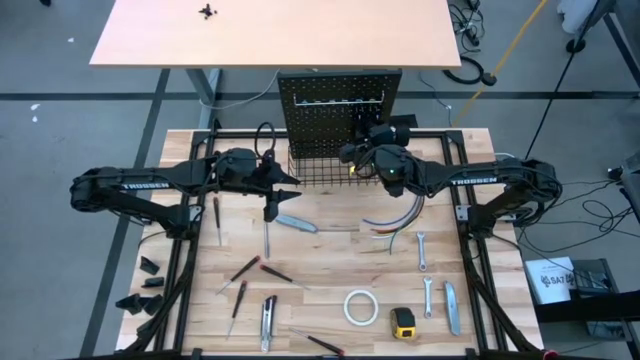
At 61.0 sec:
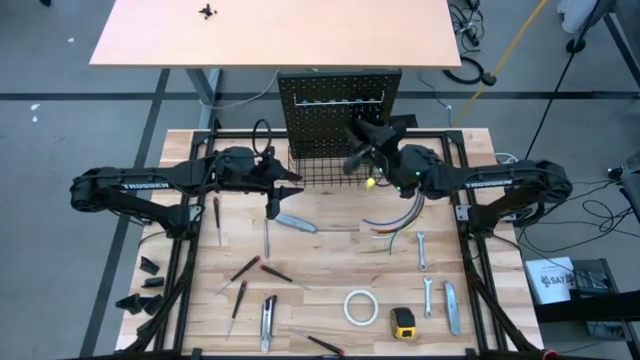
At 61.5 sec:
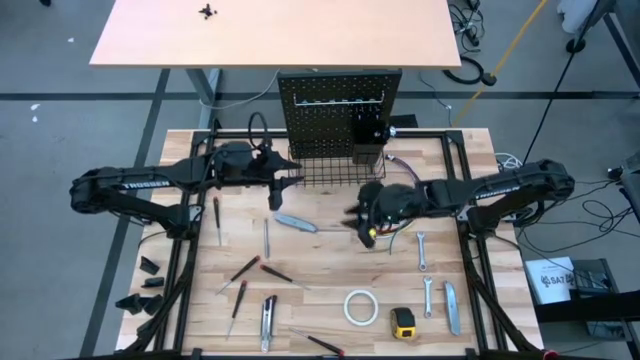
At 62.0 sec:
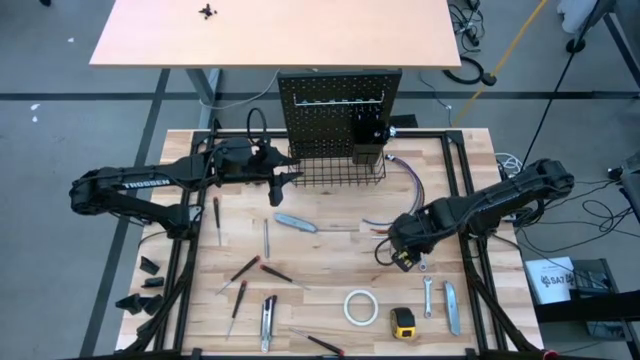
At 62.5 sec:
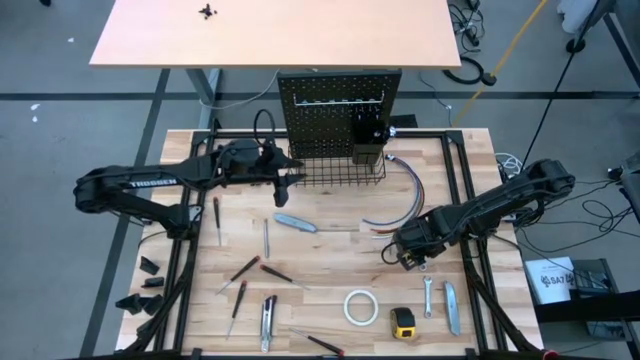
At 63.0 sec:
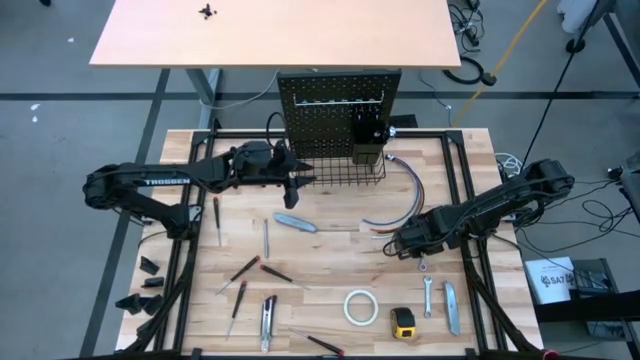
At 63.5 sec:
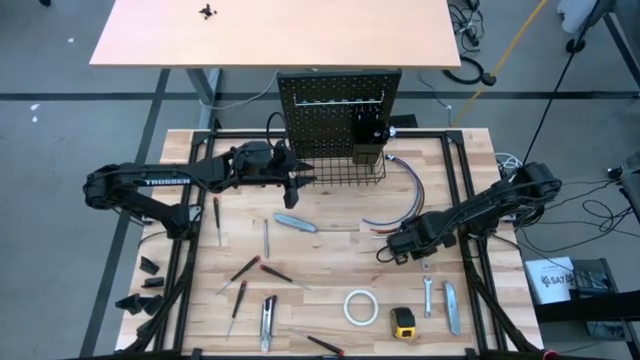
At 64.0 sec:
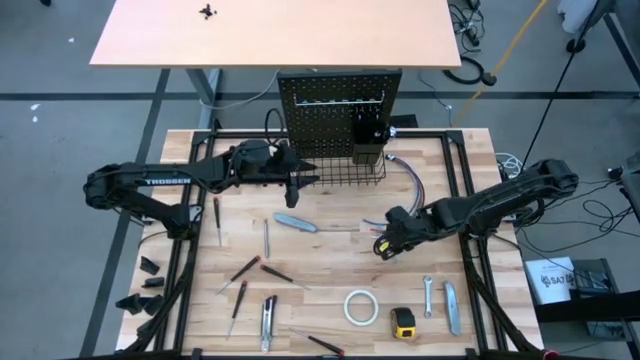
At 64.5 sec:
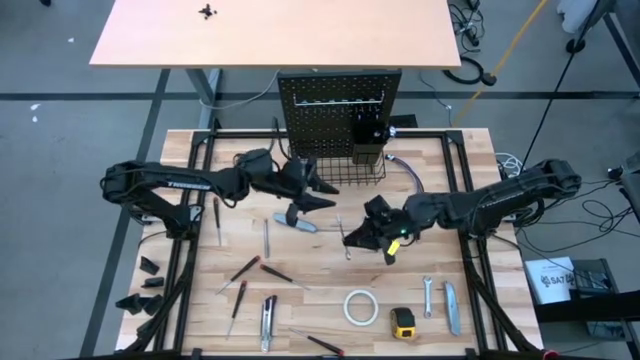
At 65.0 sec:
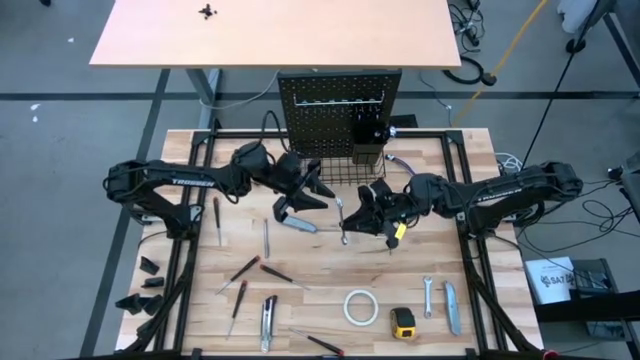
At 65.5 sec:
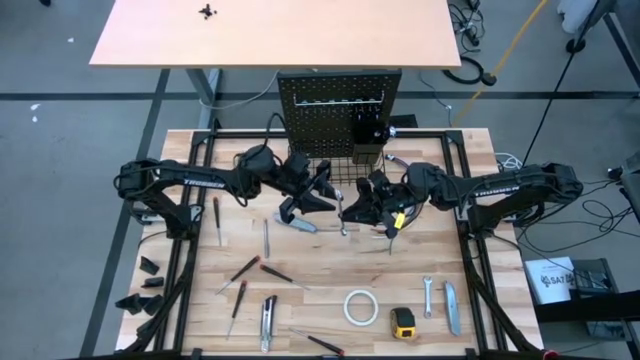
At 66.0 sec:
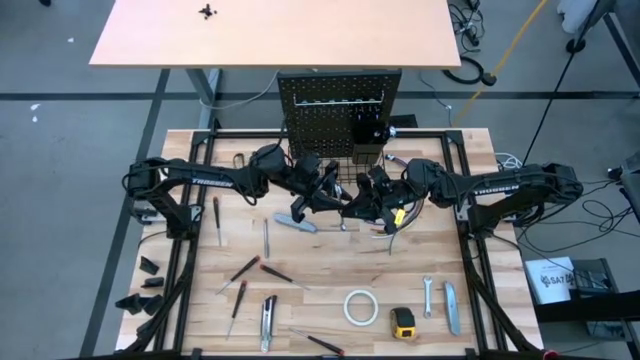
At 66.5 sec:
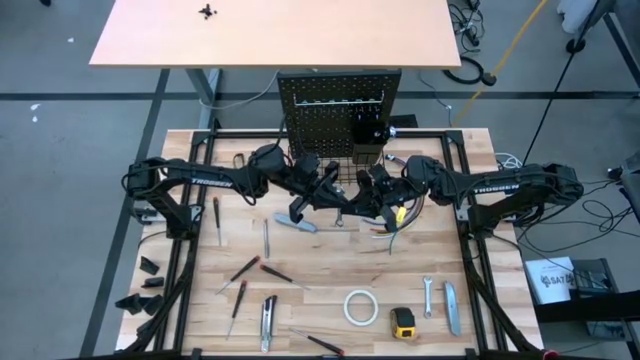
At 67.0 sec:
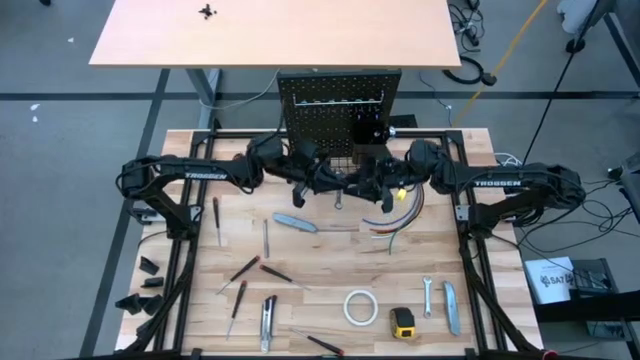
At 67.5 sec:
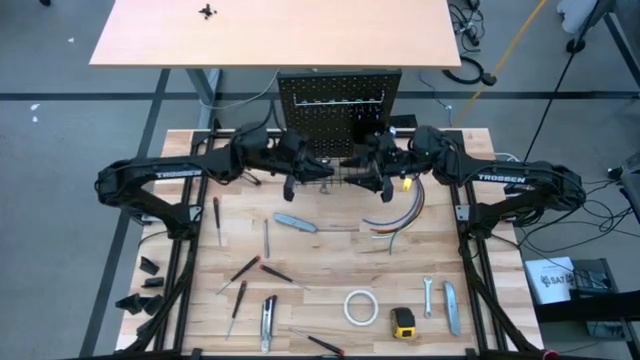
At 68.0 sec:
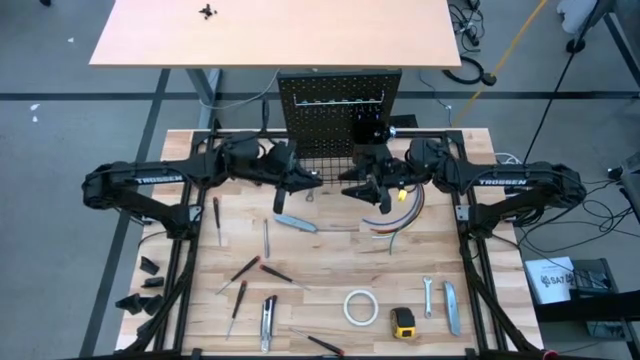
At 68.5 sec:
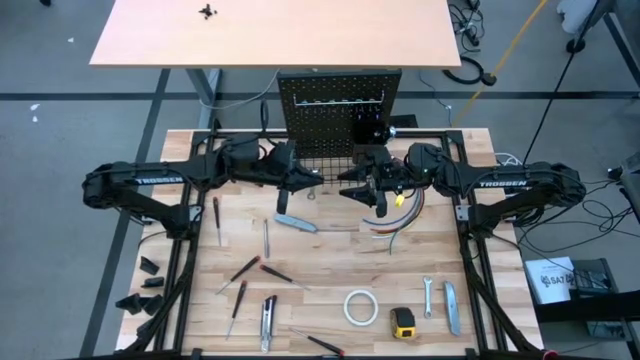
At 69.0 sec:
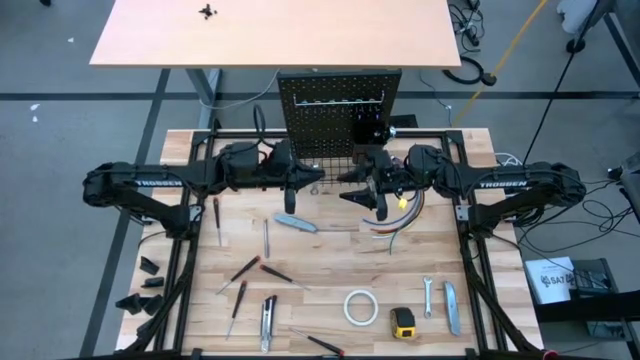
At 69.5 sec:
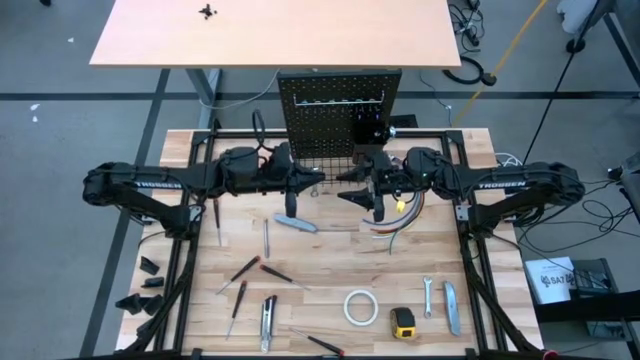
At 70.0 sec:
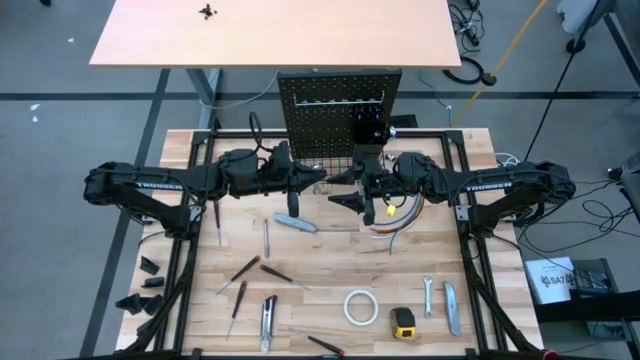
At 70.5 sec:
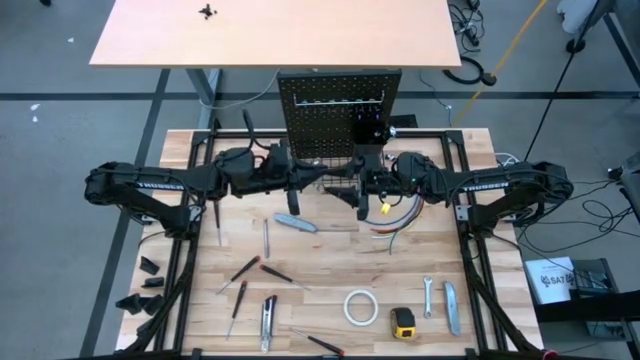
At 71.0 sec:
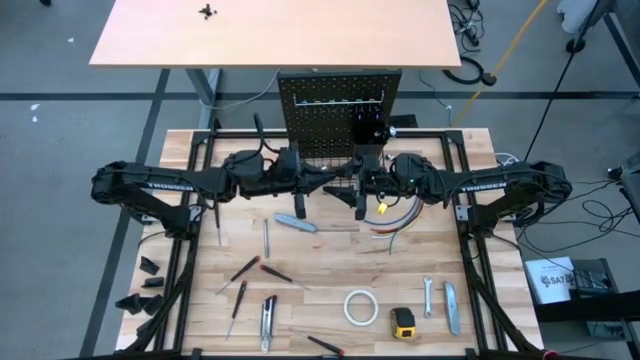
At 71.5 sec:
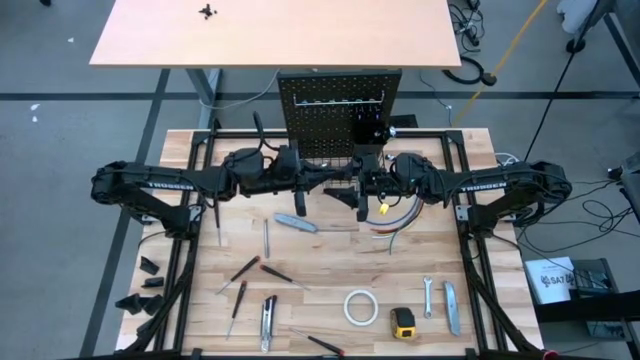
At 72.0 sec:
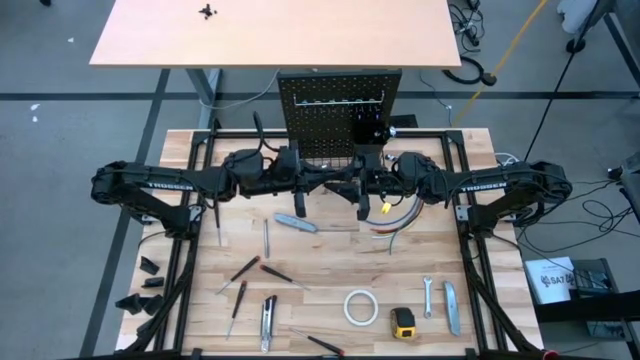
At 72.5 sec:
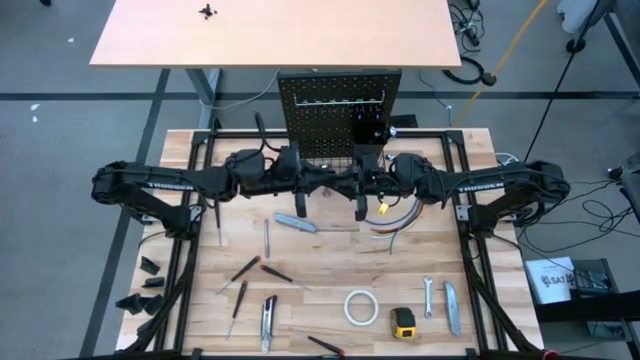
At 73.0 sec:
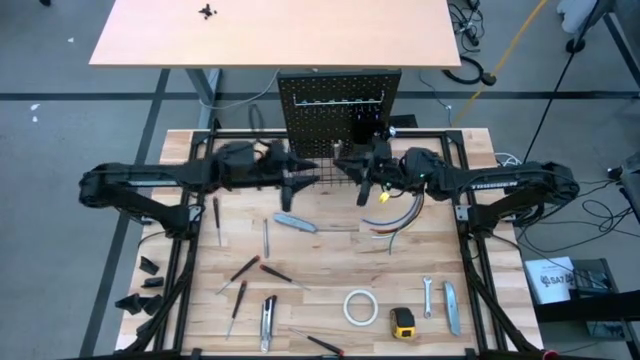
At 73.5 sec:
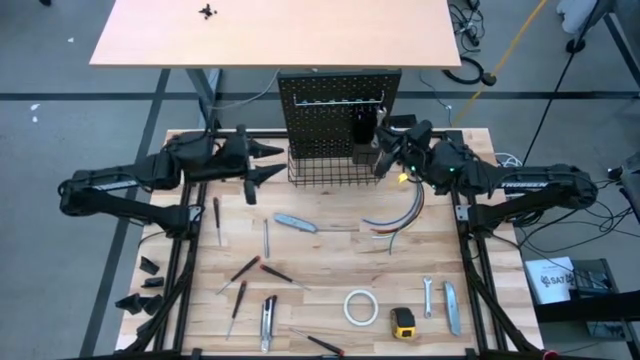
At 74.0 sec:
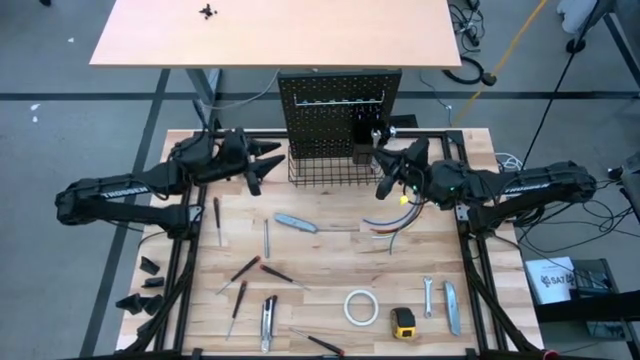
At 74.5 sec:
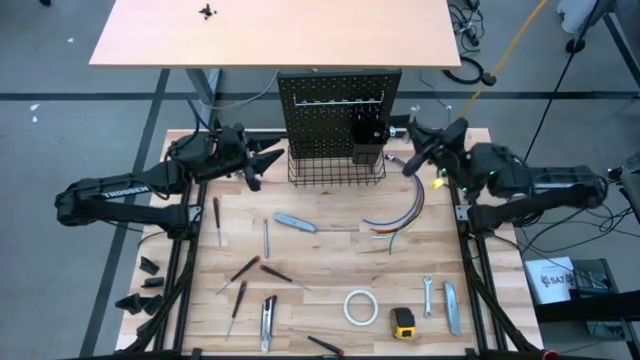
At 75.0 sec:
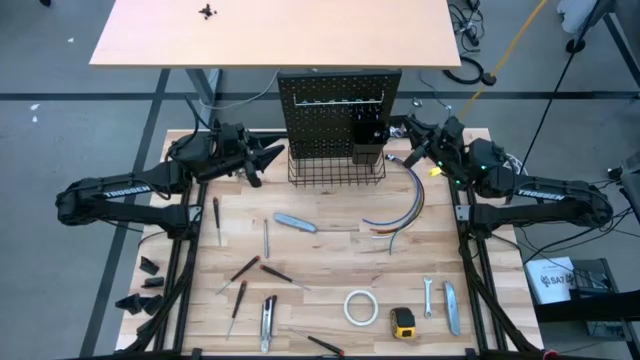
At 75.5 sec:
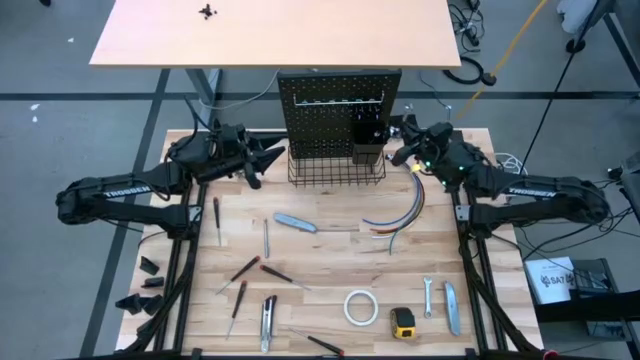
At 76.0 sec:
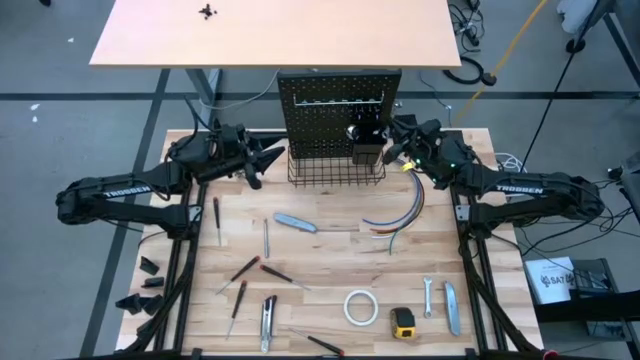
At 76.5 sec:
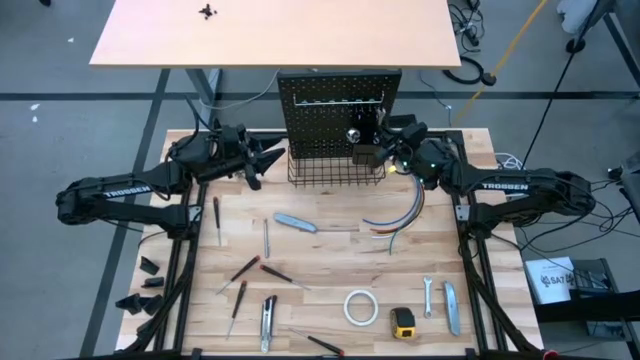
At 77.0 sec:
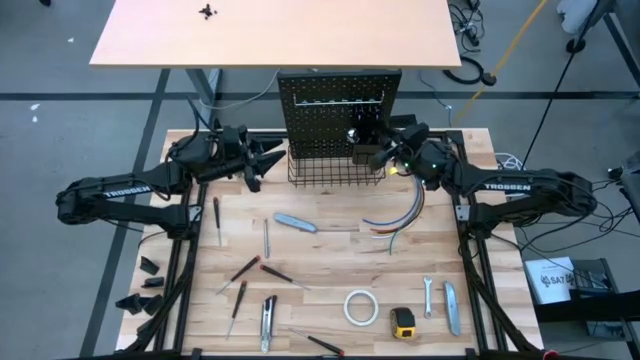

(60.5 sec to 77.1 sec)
Task: Hang tools onto peg board
Put the wrench into the black bin on the pegboard
